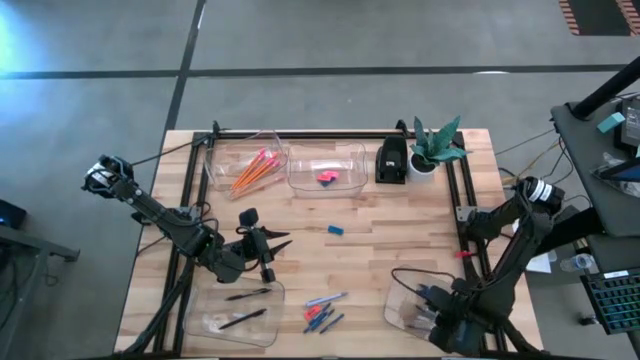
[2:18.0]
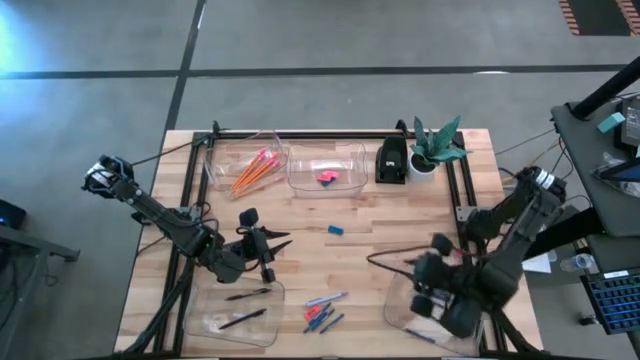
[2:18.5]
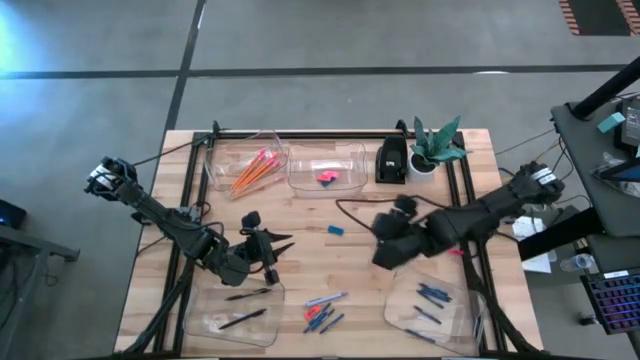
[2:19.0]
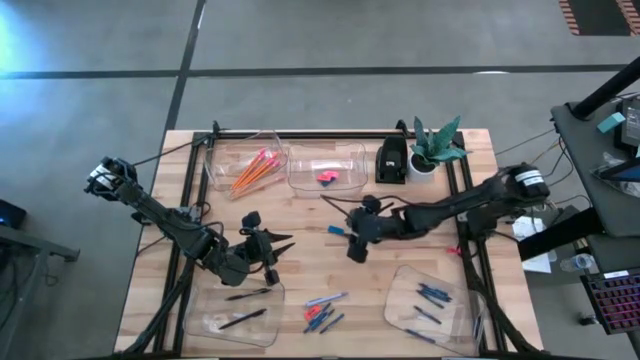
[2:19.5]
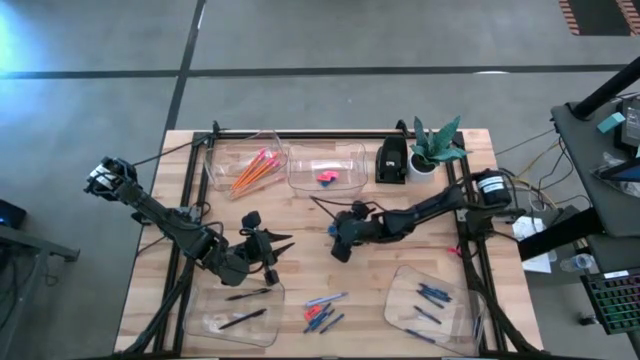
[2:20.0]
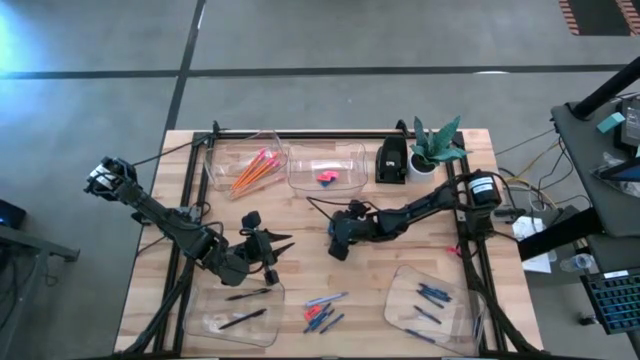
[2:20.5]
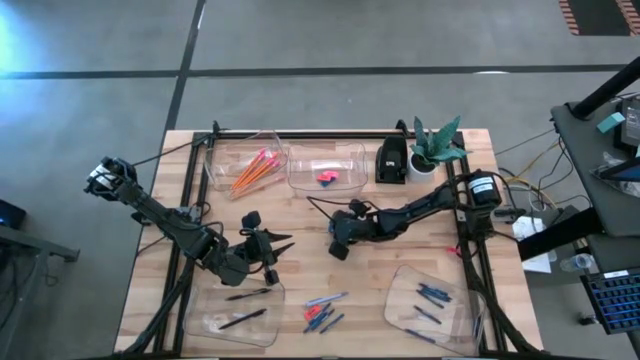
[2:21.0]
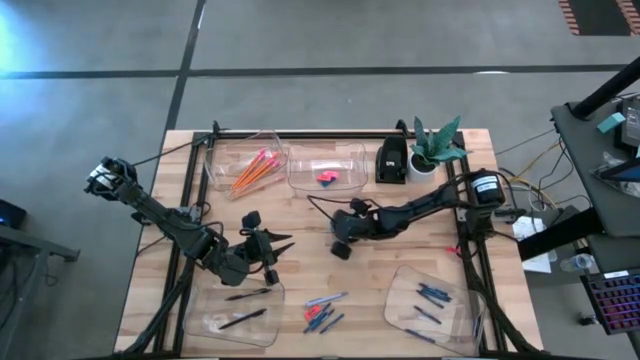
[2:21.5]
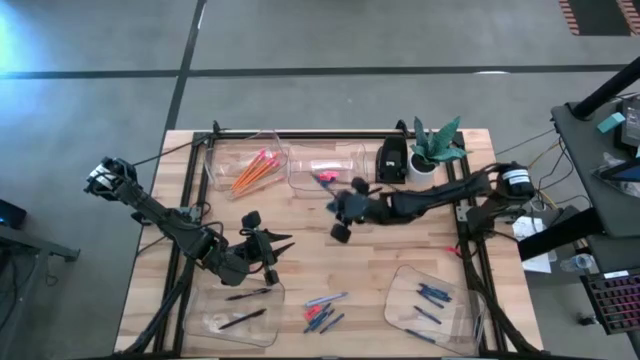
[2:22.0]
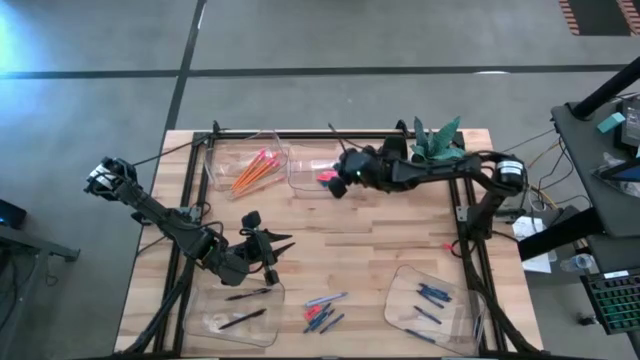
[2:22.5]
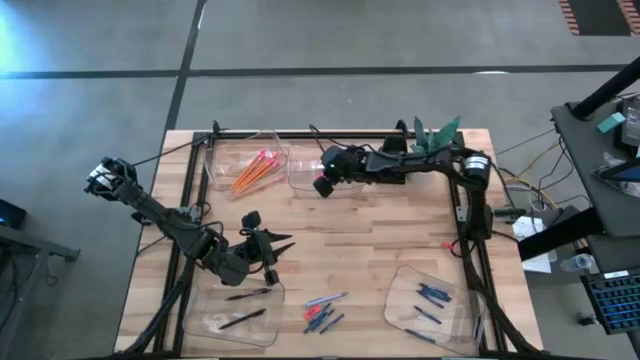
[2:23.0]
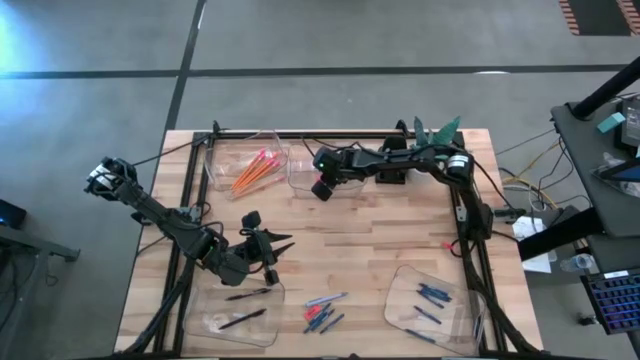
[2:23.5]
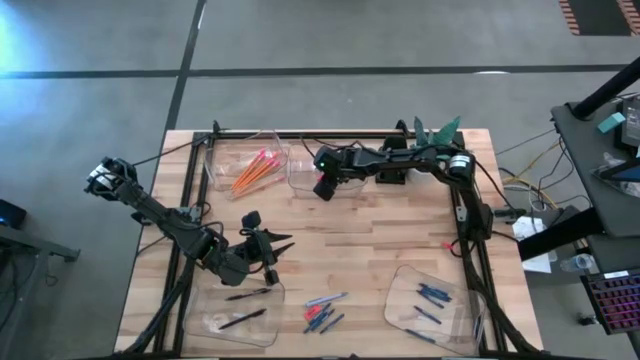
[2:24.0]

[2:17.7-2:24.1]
Task: Sort crayons/erasers/pens/pencils in bins
Put the blue eraser into the top right transparent bin

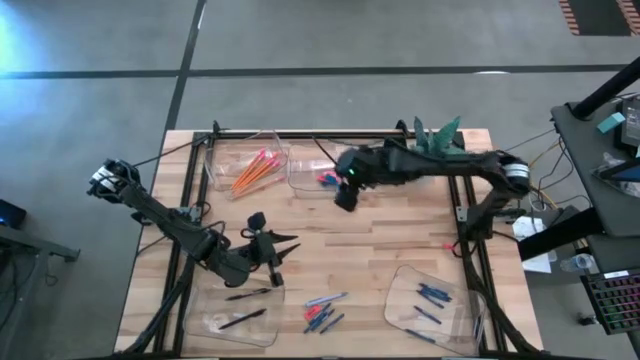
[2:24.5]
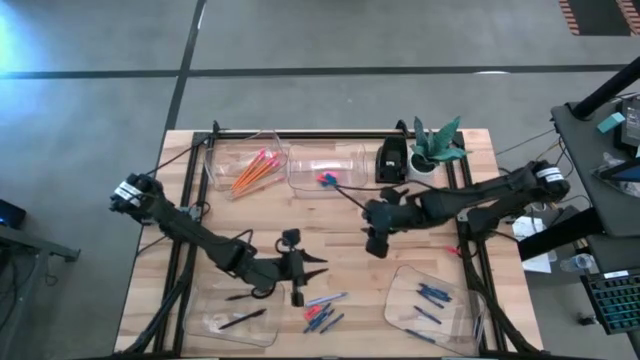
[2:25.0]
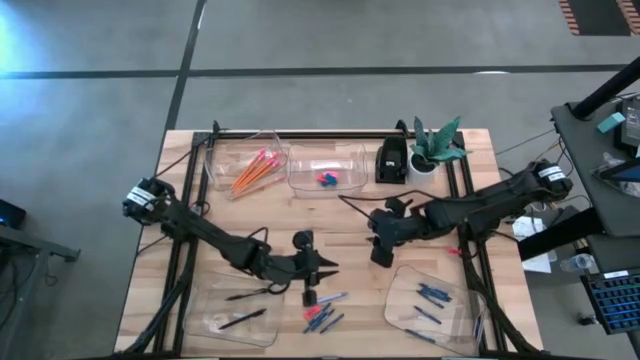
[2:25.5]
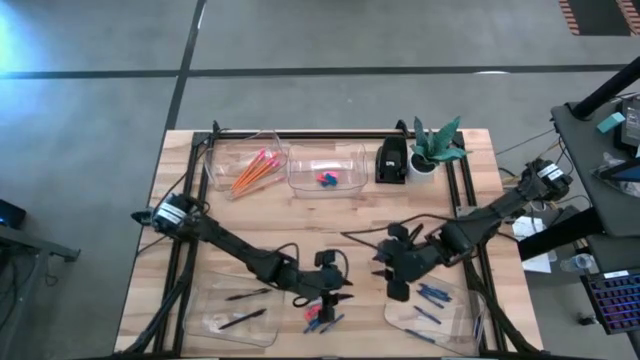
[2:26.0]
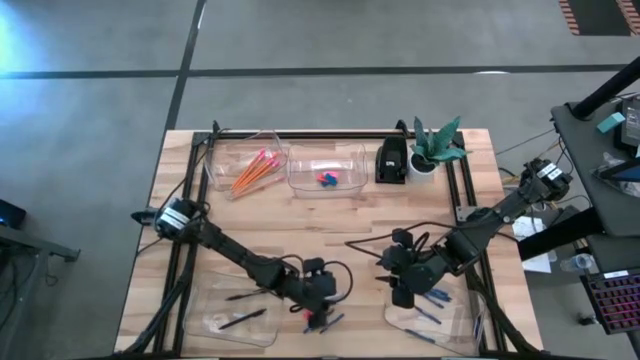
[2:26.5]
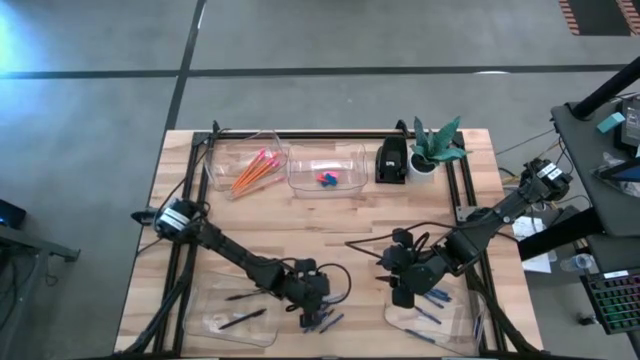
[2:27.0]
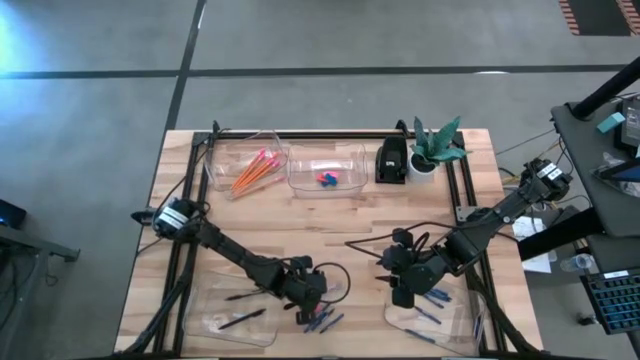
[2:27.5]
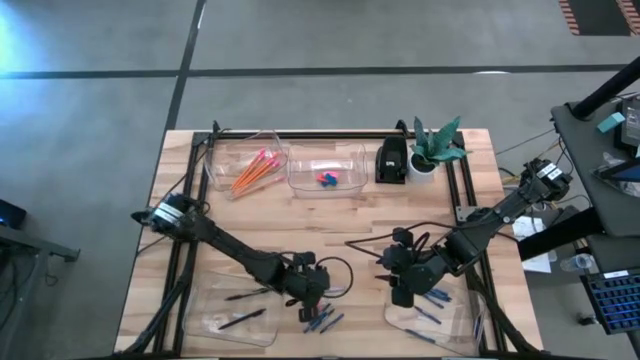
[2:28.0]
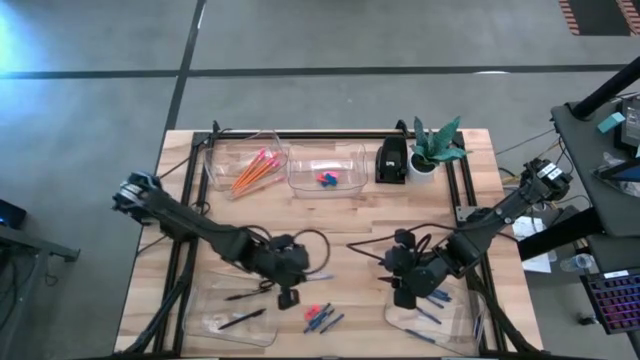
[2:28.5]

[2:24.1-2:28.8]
Put the gray pen into the bottom left transparent bin

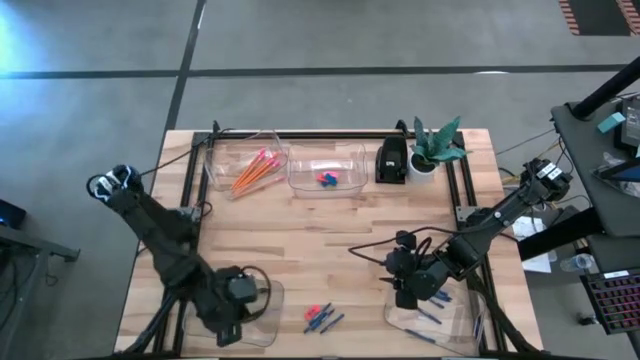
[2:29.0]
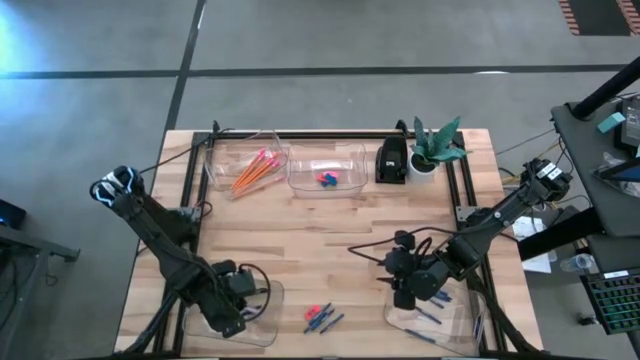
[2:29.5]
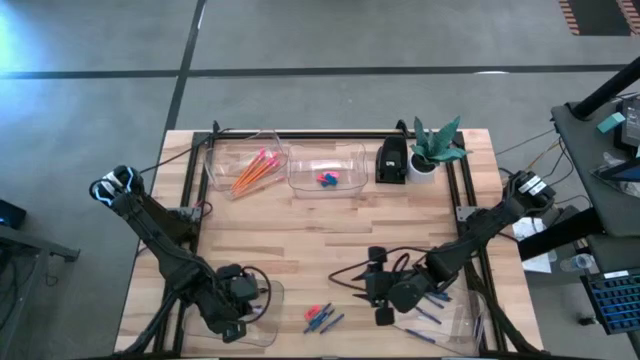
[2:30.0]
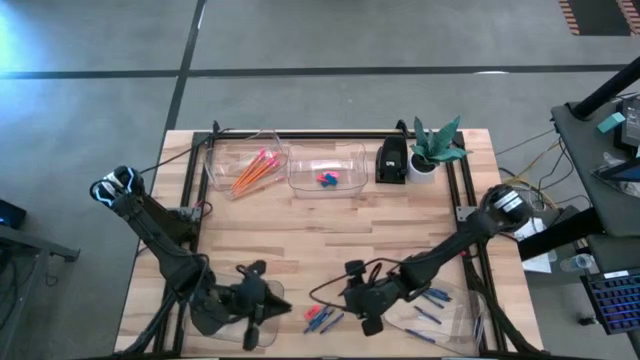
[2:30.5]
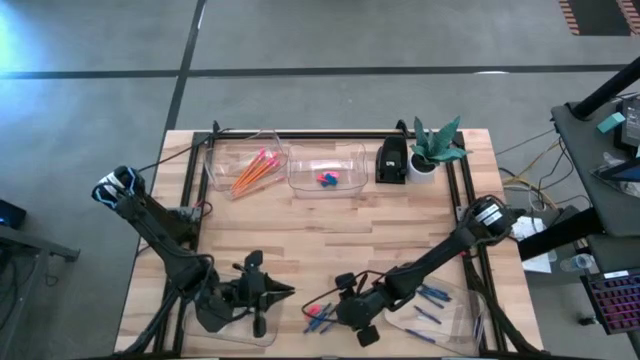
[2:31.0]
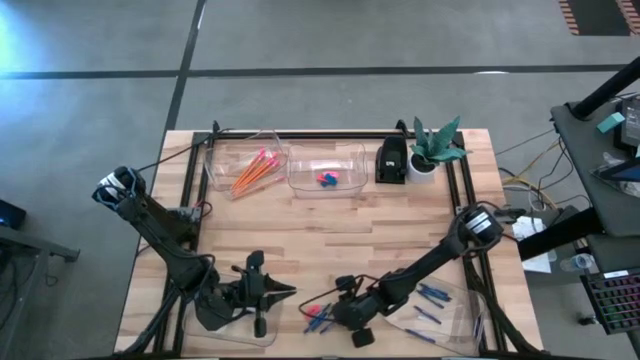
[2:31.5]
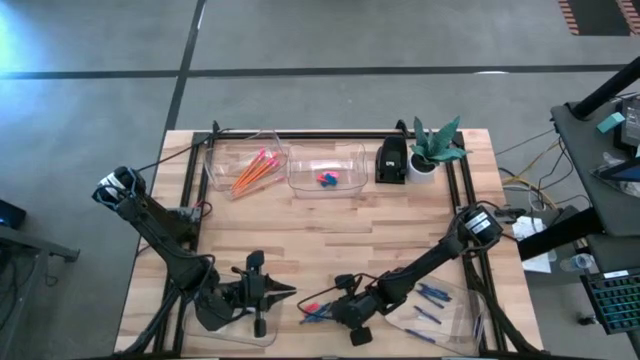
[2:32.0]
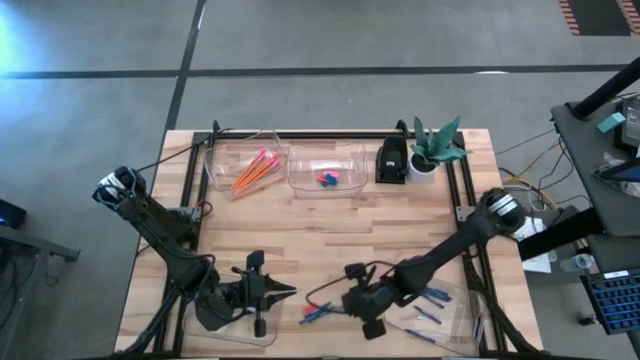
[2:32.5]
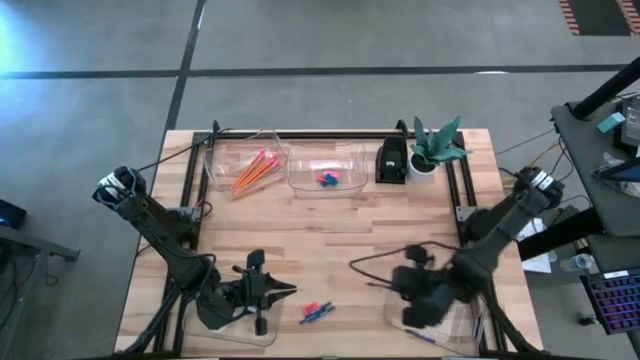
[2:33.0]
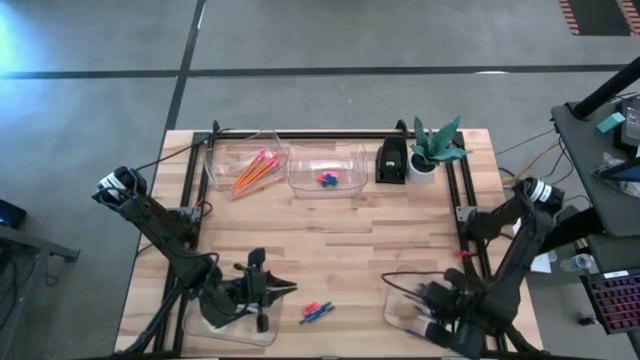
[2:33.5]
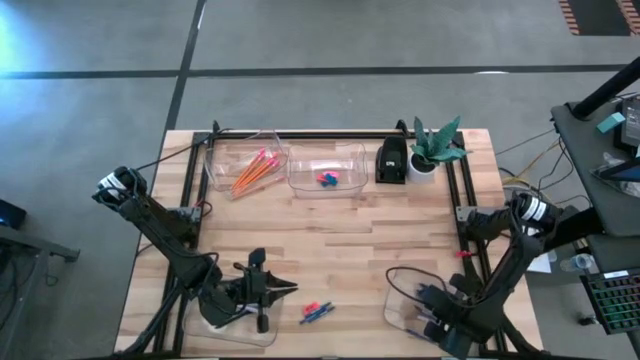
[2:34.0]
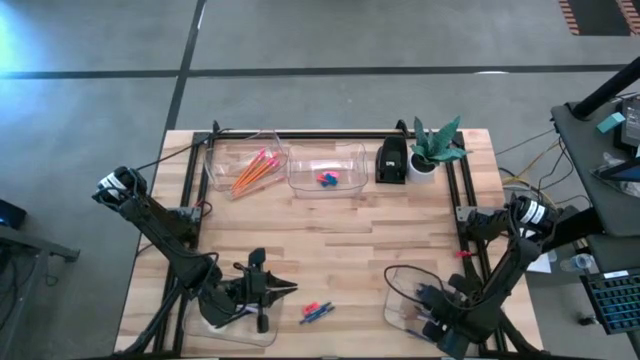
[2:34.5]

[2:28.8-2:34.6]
Put the dark blue crayon into the bottom right transparent bin
